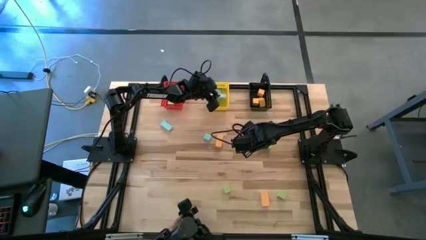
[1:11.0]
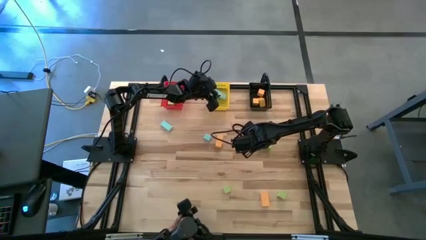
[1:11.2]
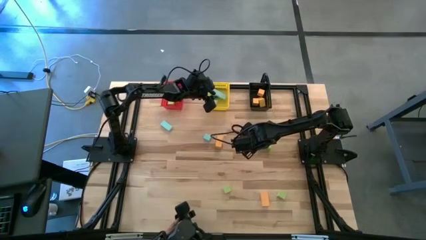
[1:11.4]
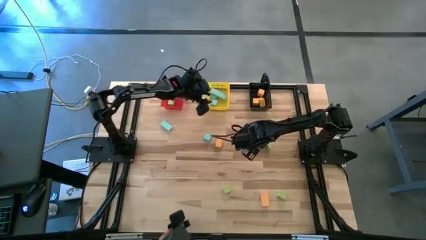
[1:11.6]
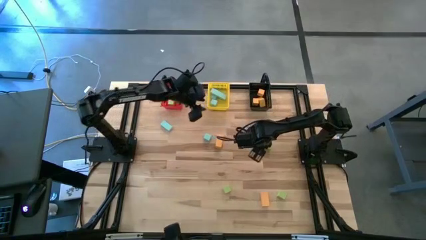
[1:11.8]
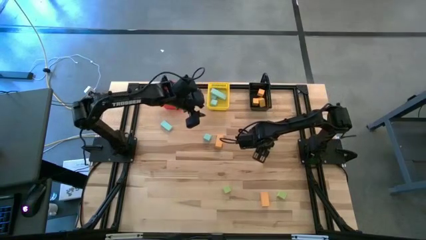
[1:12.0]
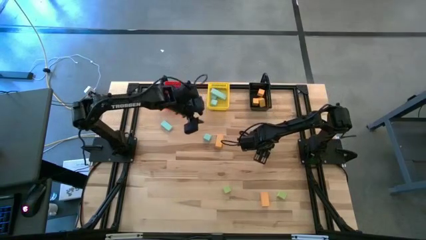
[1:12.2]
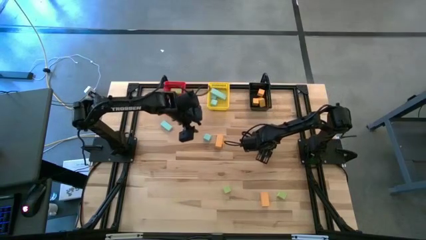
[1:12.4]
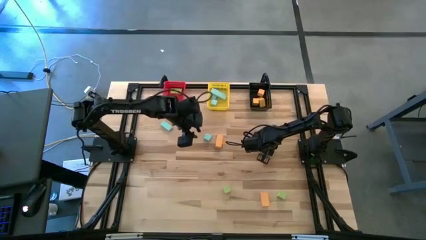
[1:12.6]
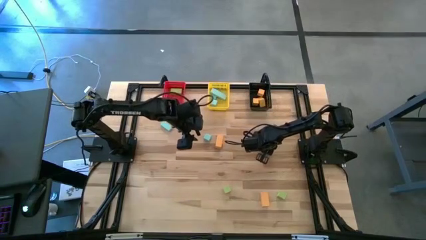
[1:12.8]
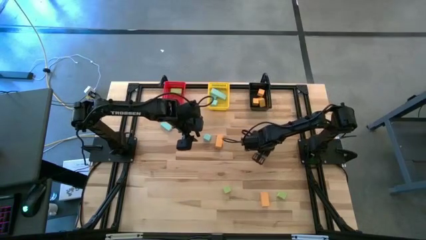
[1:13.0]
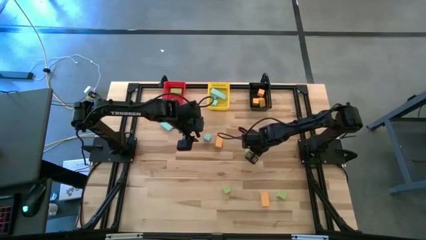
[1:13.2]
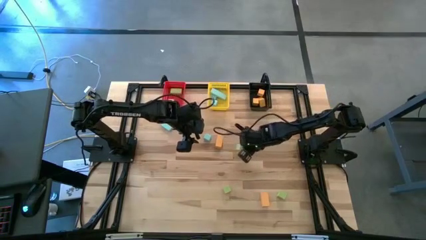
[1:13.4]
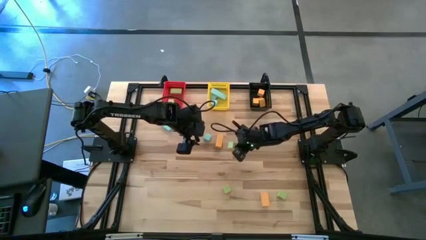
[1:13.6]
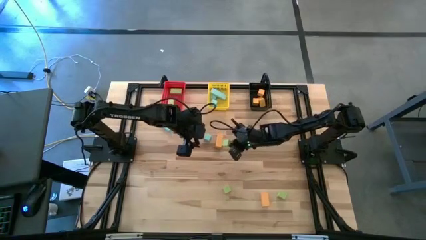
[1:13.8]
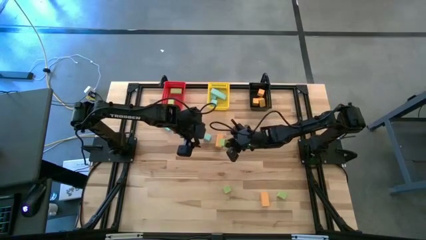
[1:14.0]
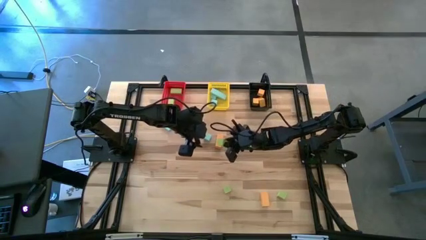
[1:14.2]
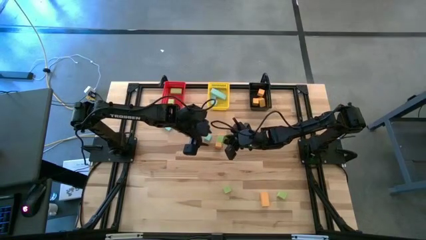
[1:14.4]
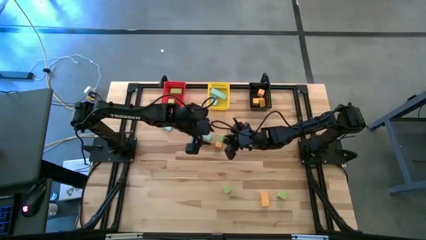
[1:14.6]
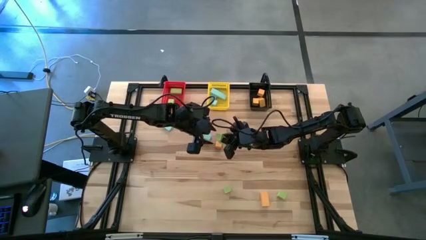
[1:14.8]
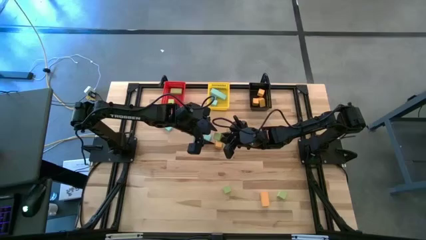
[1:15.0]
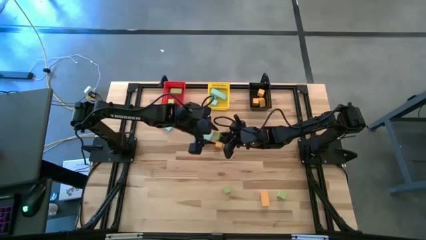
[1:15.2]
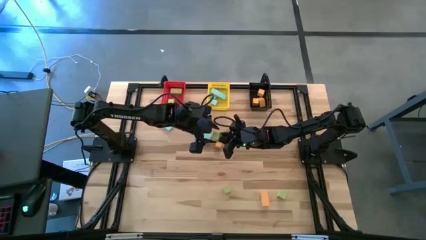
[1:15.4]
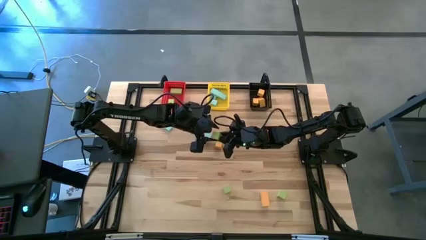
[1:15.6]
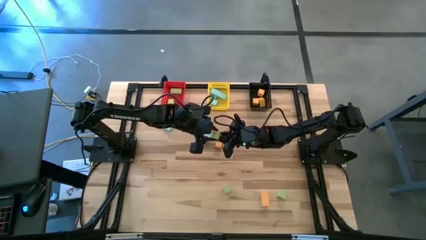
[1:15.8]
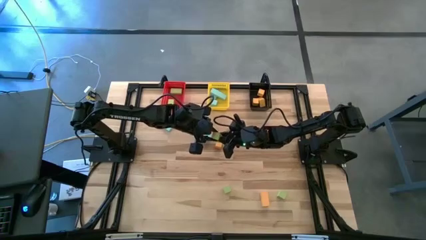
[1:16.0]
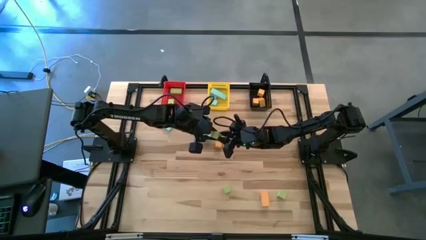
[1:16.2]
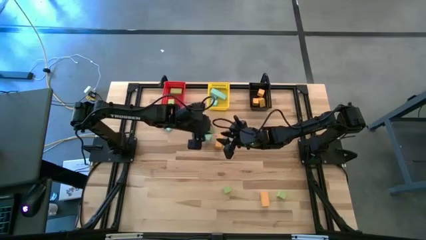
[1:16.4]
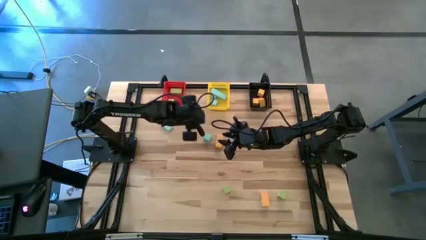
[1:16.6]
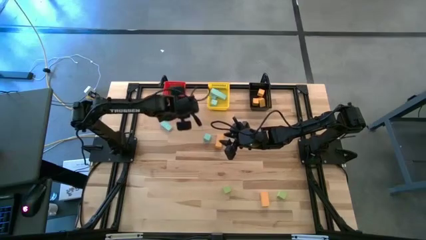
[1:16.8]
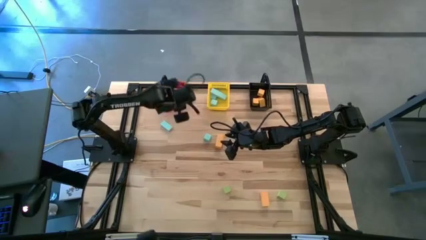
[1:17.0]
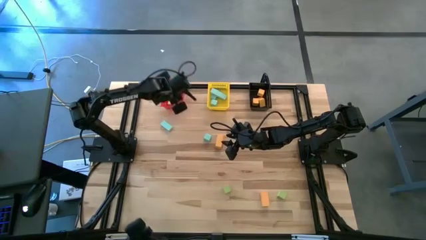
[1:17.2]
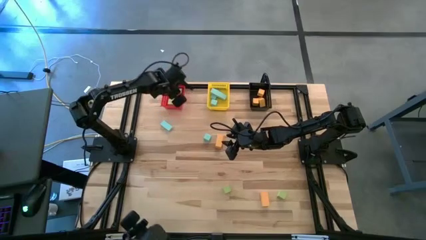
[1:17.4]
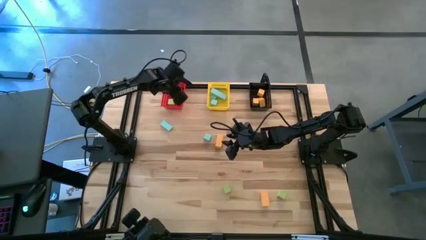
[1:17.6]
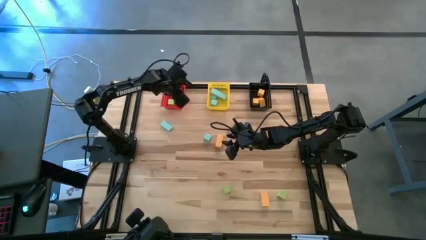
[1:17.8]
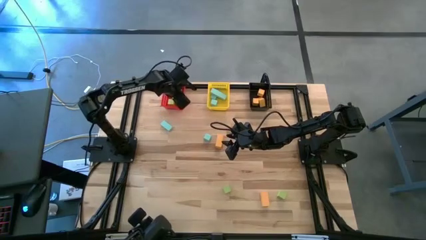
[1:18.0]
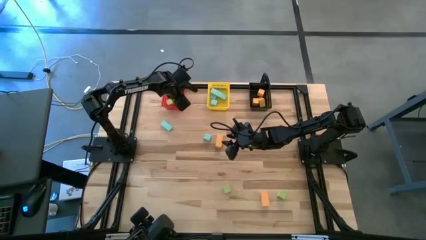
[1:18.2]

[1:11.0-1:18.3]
Task: Sort & place blocks by color
Put the green block into the red bin

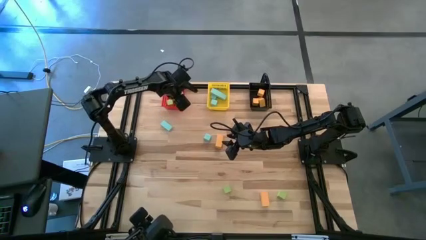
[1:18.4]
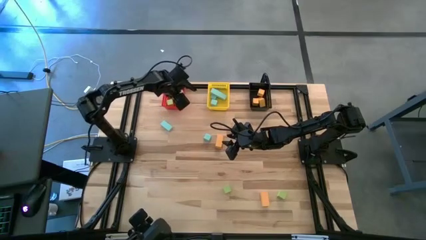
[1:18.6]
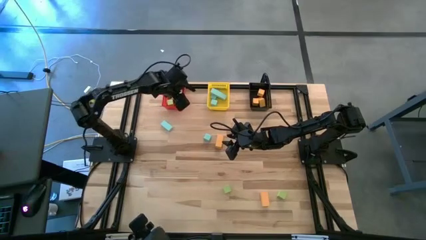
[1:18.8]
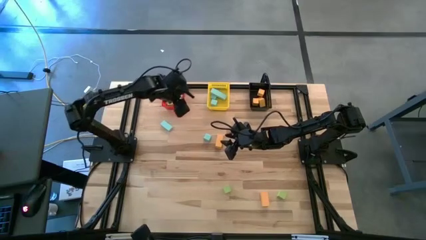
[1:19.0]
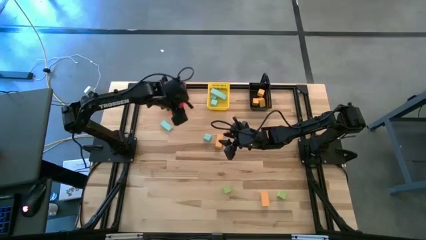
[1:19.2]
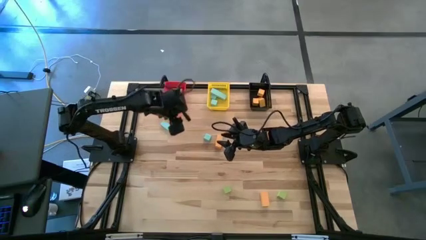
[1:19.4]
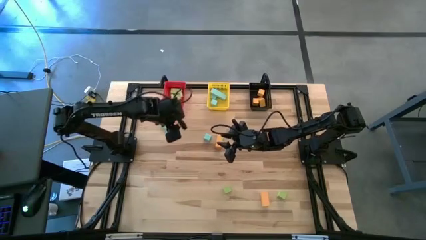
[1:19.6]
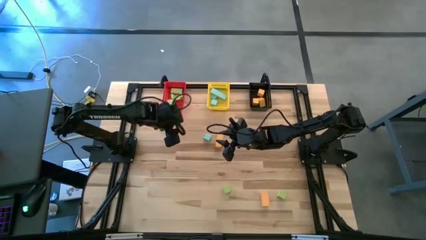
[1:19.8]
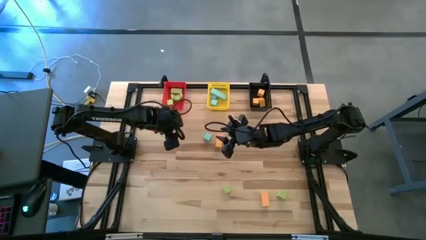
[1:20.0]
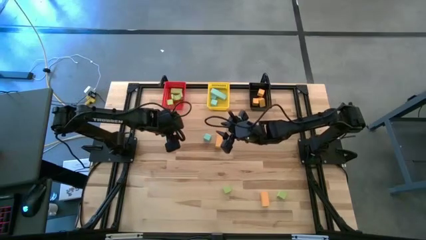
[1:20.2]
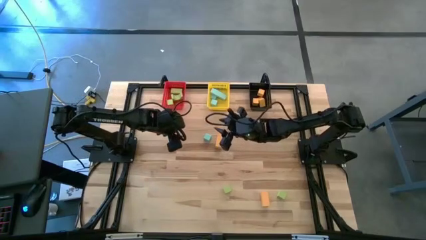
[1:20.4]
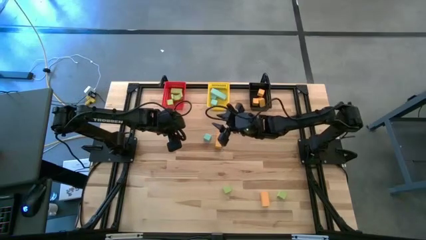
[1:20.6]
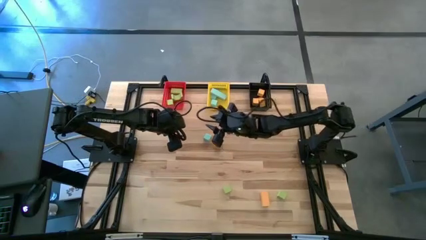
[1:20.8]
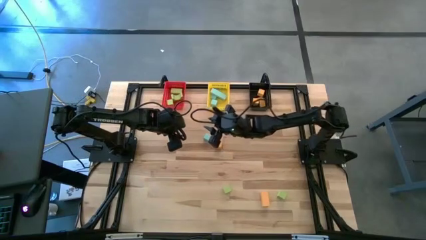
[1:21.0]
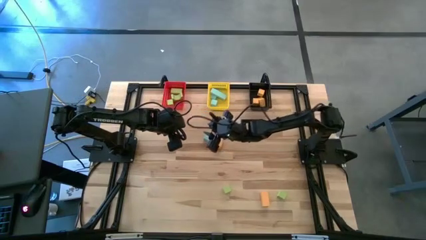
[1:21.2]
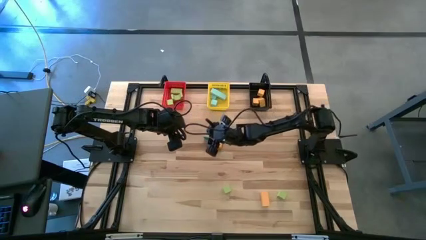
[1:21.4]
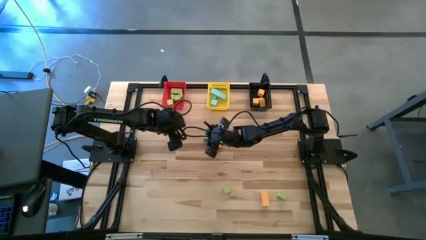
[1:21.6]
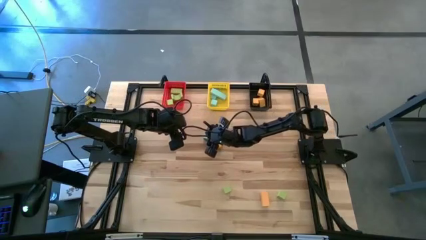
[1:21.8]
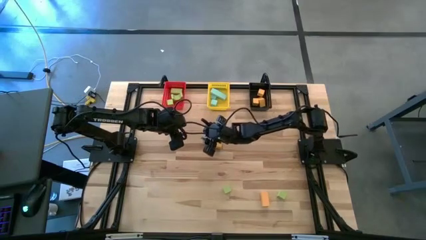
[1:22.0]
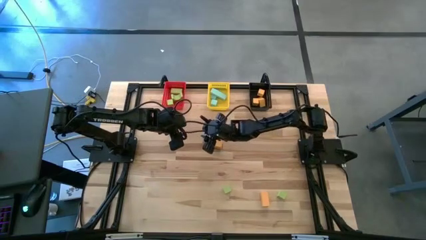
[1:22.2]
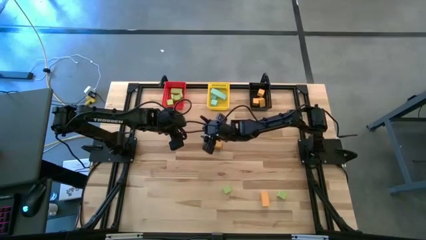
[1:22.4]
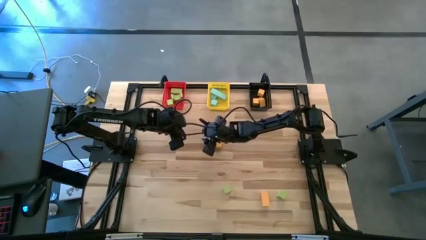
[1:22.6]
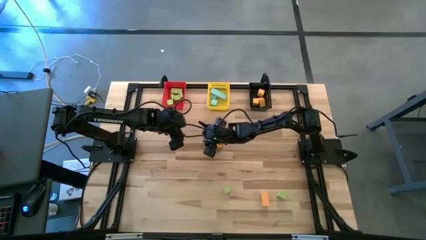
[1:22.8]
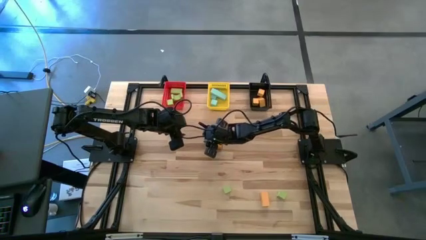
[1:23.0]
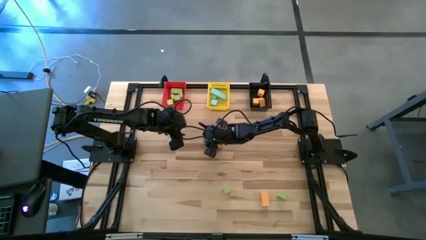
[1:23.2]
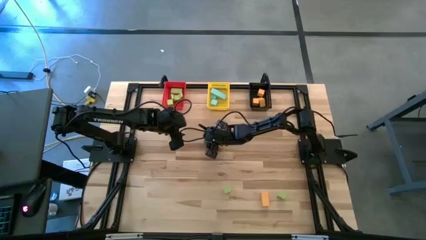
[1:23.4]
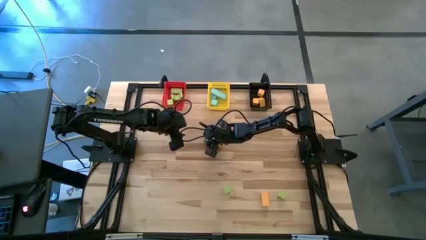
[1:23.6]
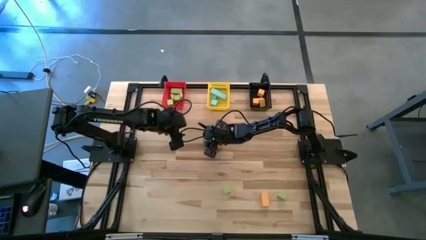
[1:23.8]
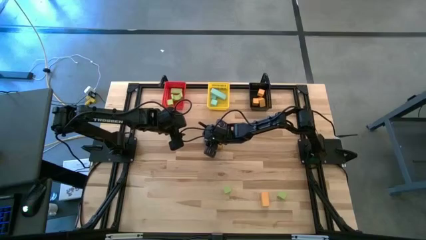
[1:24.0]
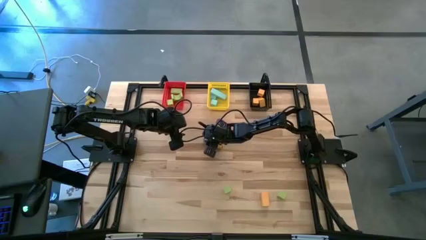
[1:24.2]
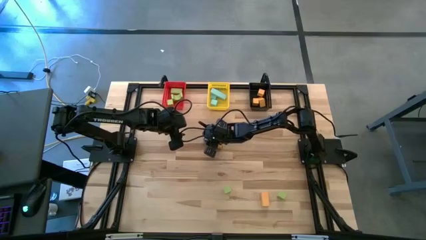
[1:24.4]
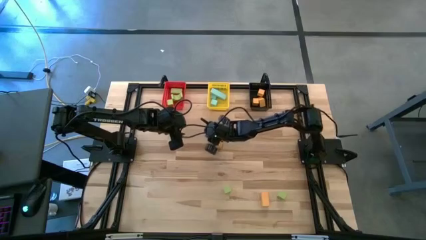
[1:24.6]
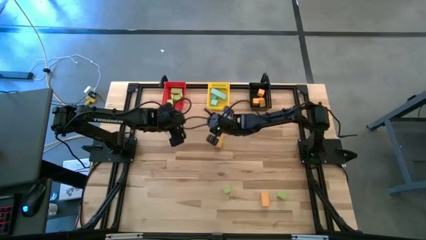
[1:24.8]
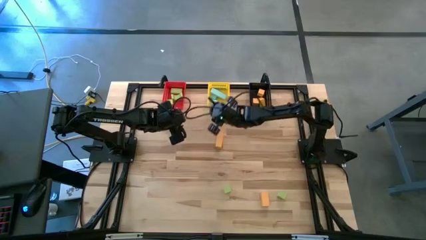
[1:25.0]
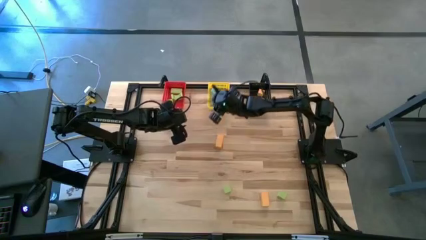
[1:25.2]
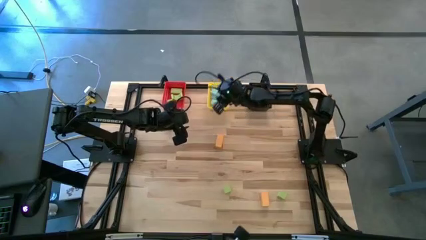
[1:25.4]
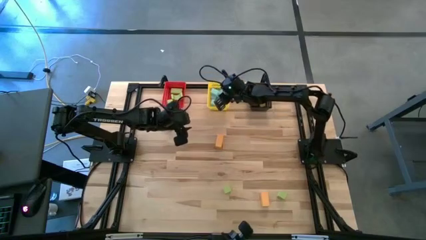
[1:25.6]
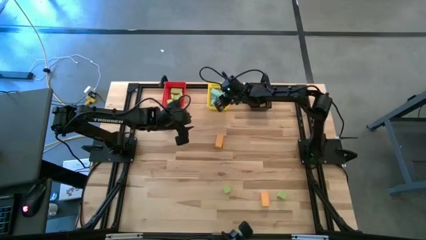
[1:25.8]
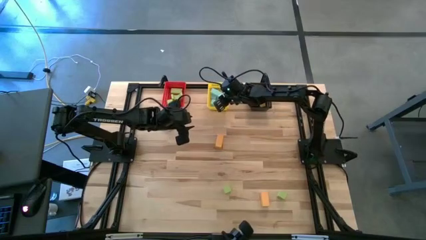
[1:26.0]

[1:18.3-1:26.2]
Put the blue block into the yellow bin

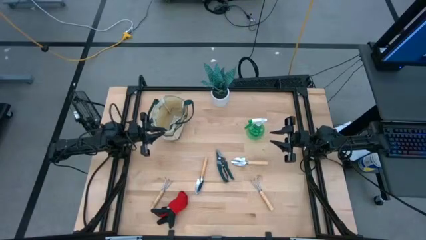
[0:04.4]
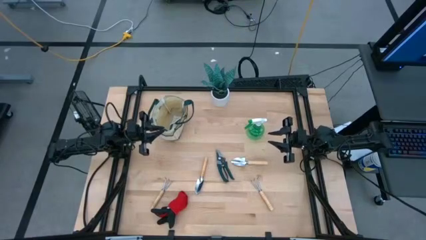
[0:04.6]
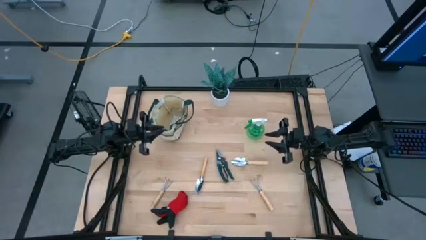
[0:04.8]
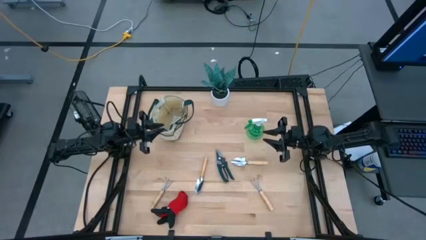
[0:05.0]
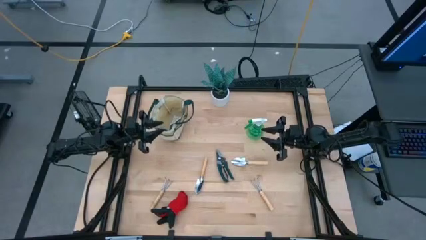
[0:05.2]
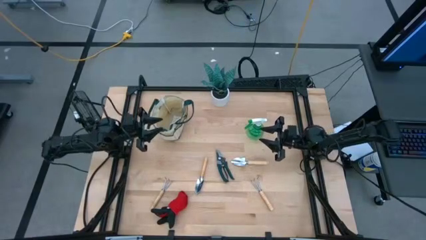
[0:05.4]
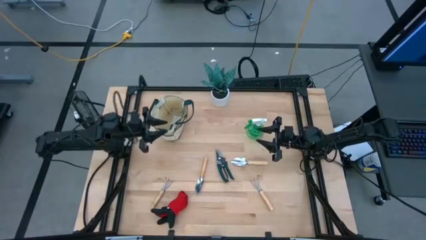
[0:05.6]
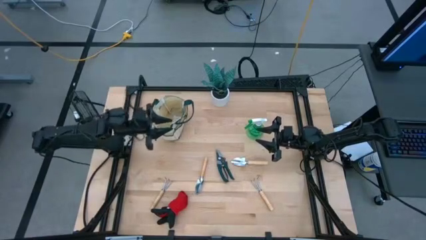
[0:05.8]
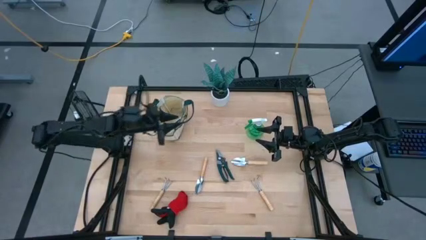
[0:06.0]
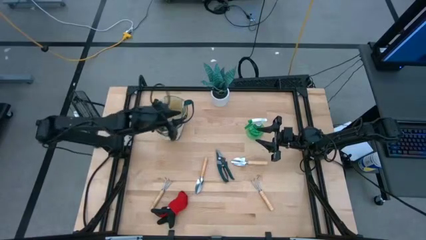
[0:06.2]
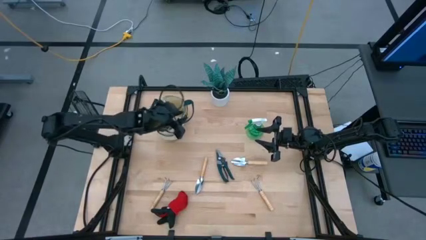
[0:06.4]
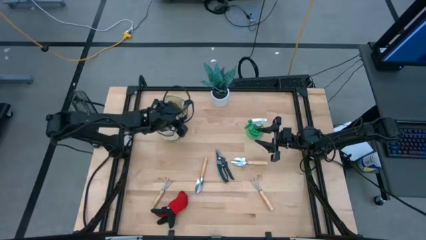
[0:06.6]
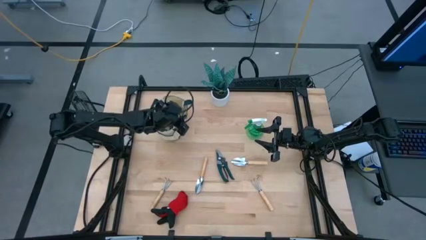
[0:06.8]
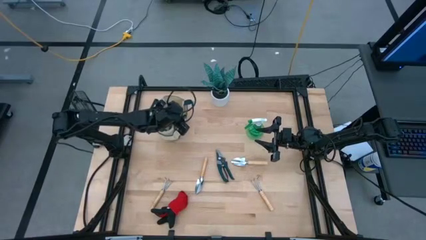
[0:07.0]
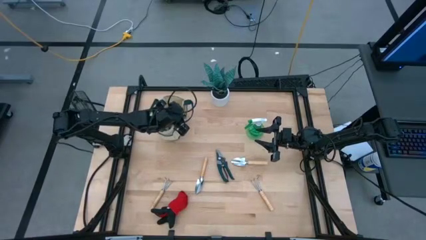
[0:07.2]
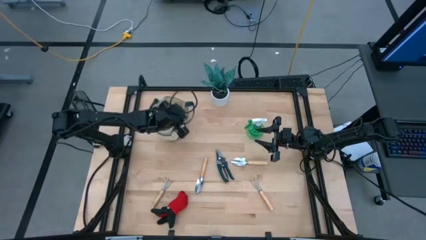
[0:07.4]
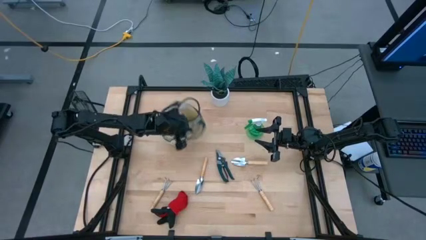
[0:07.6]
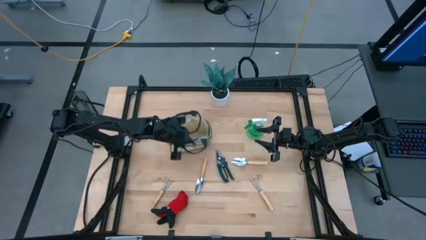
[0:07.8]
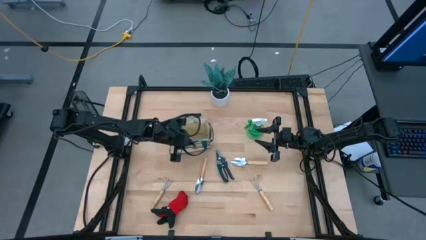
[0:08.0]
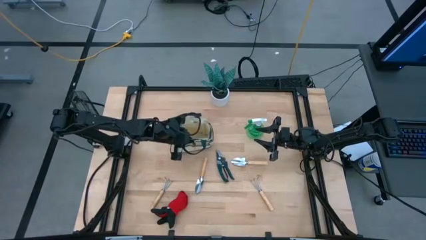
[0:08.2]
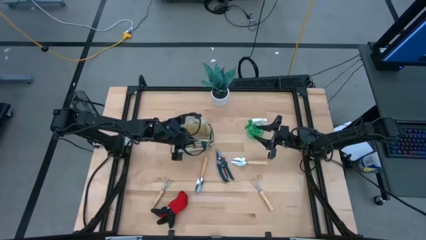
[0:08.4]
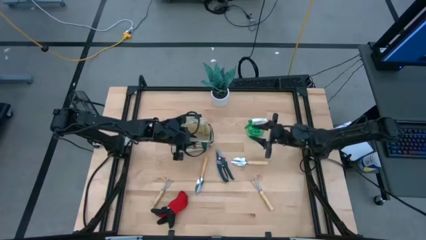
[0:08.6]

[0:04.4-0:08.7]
Task: Pick & Place Garden tools in Gardening bag
Prepare the brown gardening bag
